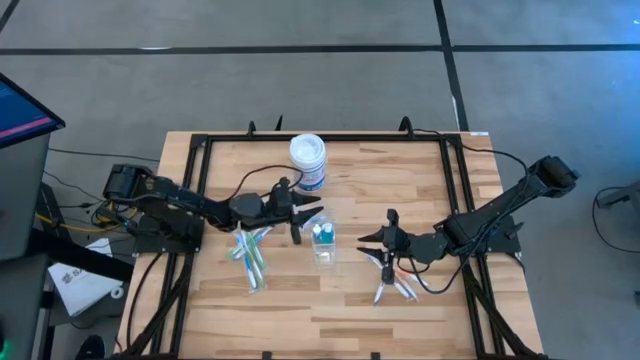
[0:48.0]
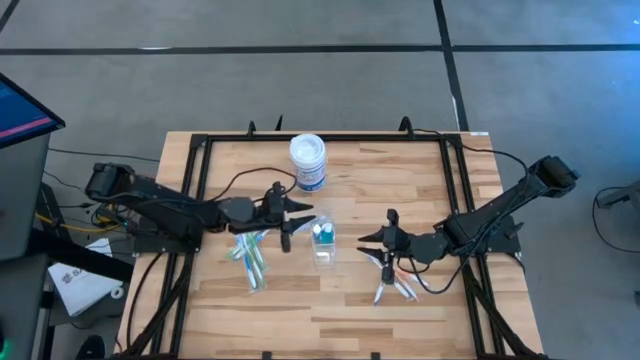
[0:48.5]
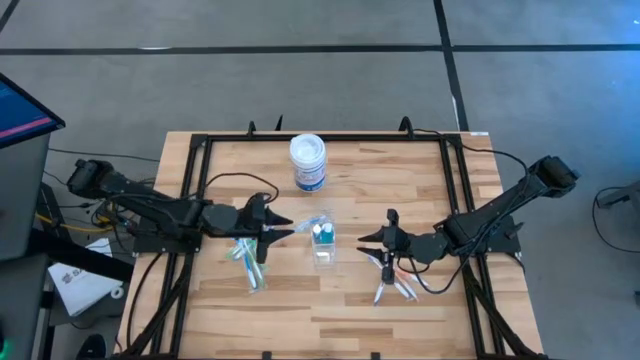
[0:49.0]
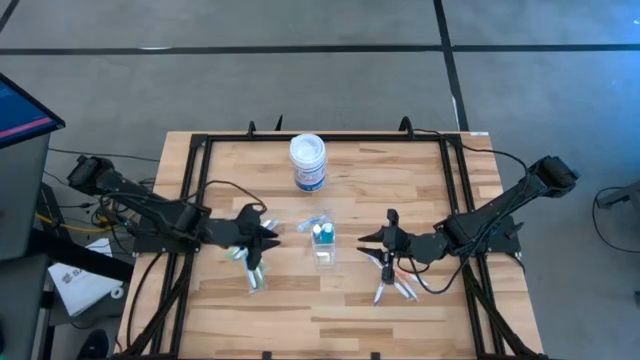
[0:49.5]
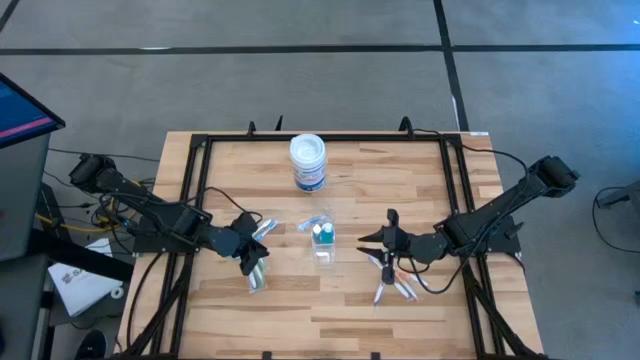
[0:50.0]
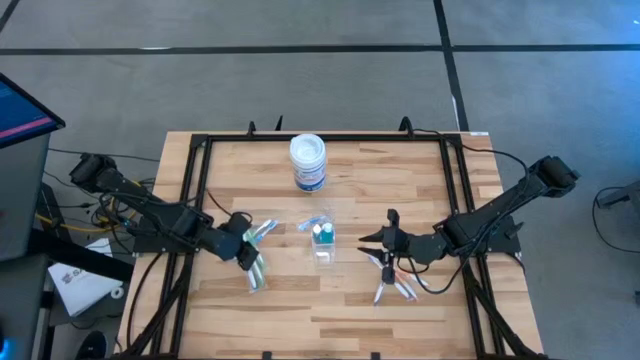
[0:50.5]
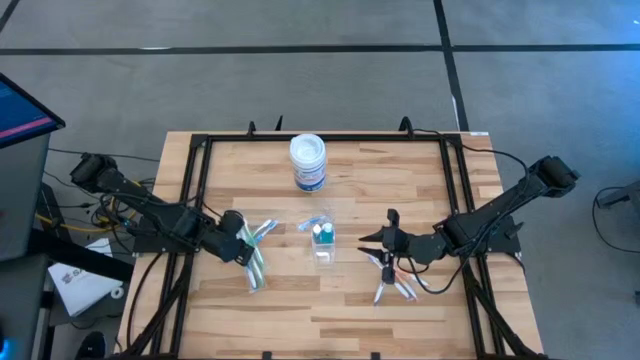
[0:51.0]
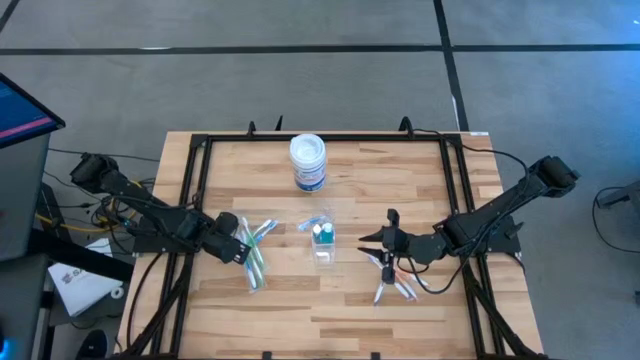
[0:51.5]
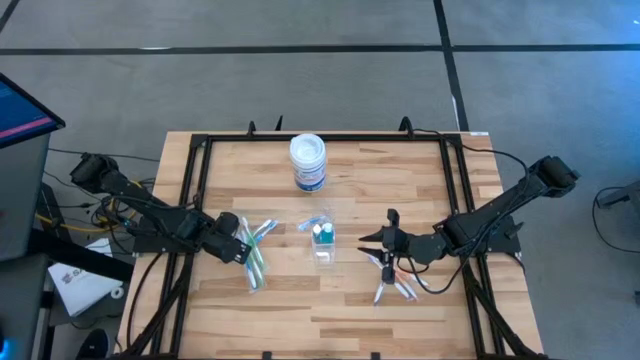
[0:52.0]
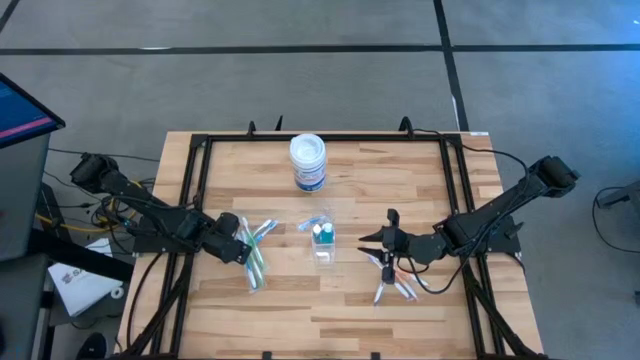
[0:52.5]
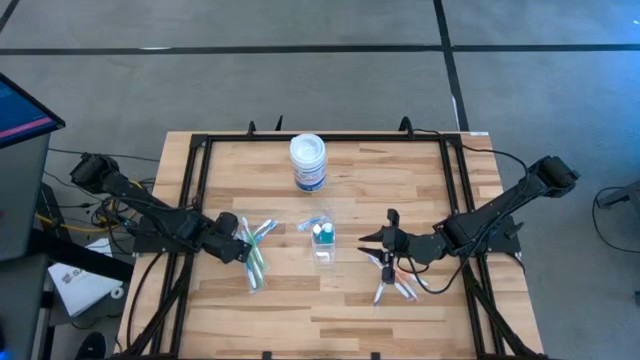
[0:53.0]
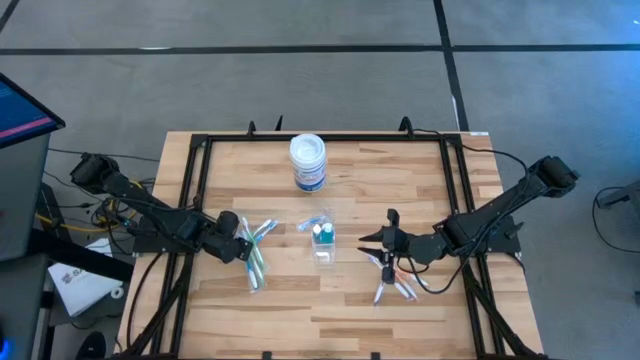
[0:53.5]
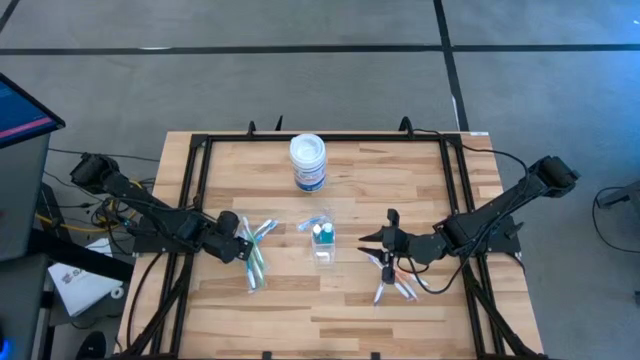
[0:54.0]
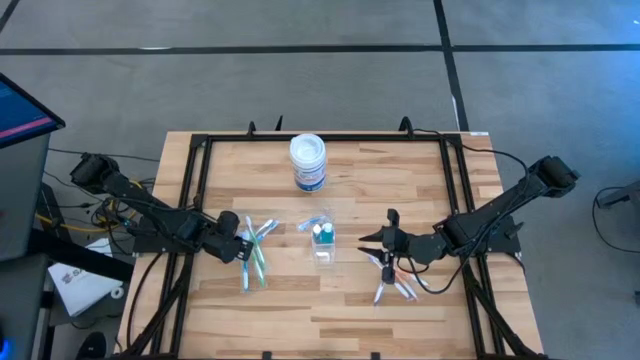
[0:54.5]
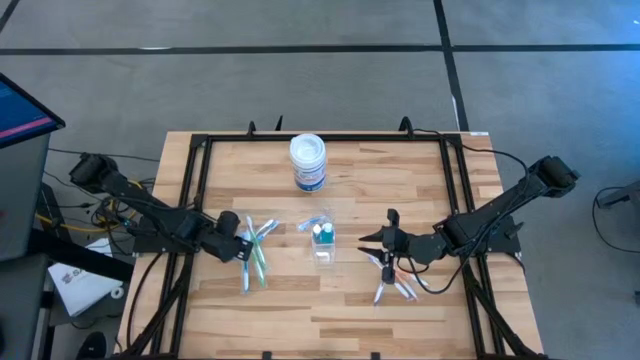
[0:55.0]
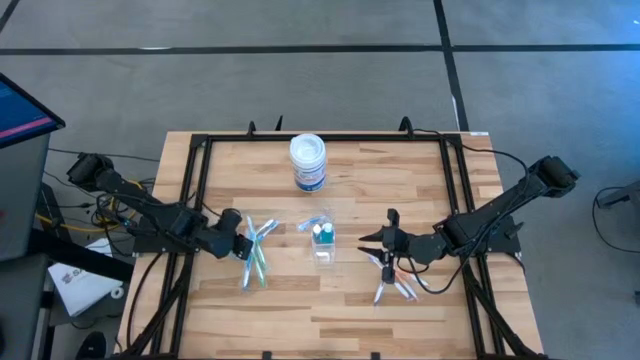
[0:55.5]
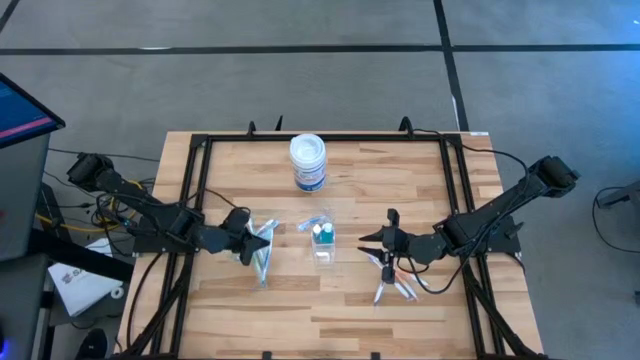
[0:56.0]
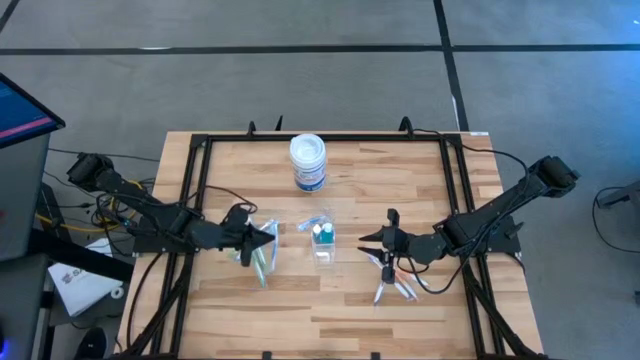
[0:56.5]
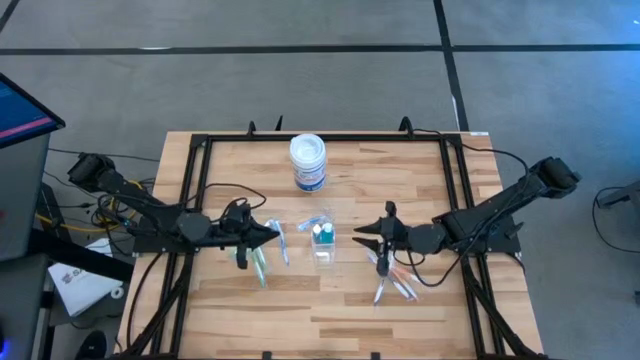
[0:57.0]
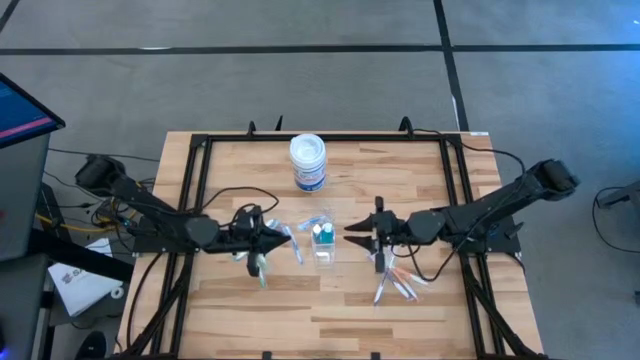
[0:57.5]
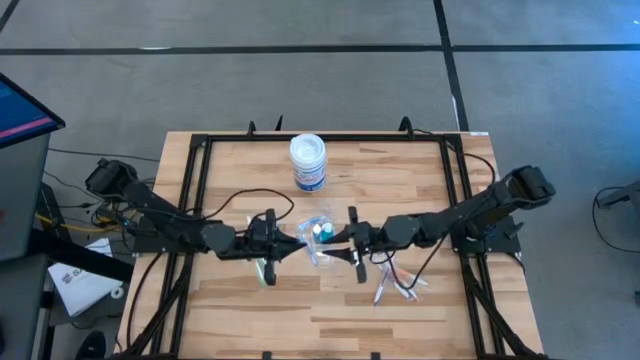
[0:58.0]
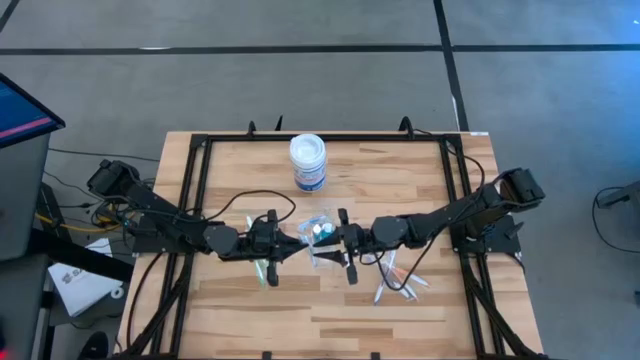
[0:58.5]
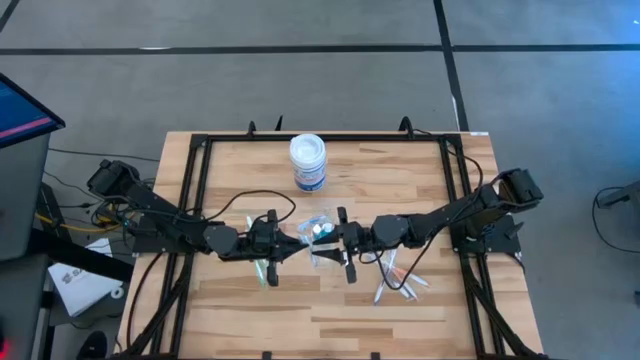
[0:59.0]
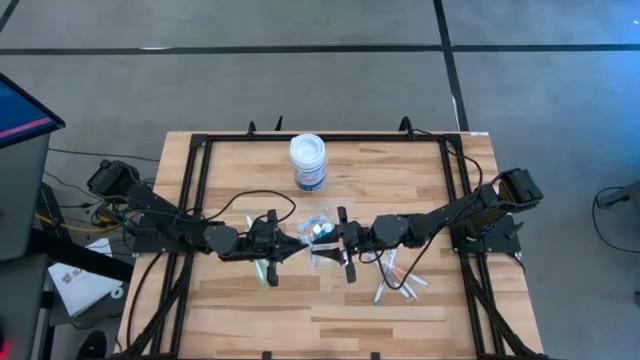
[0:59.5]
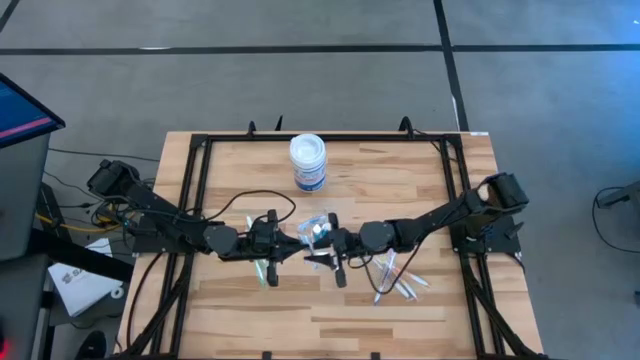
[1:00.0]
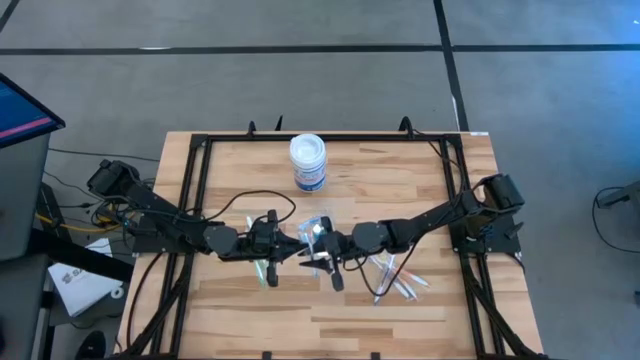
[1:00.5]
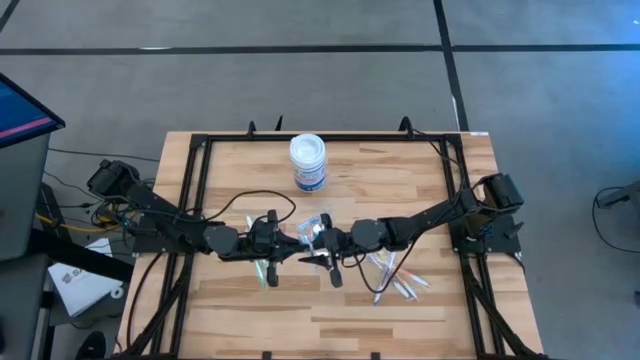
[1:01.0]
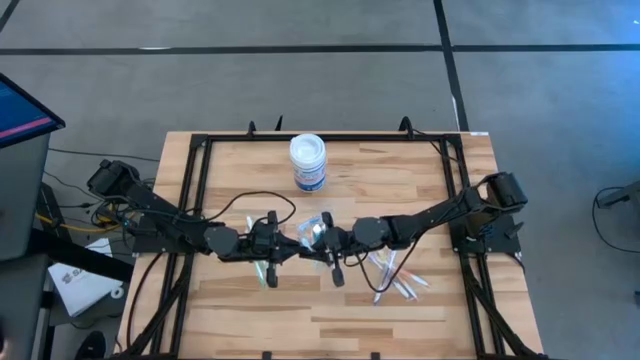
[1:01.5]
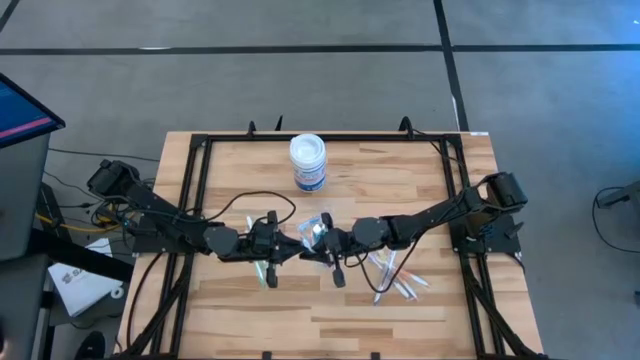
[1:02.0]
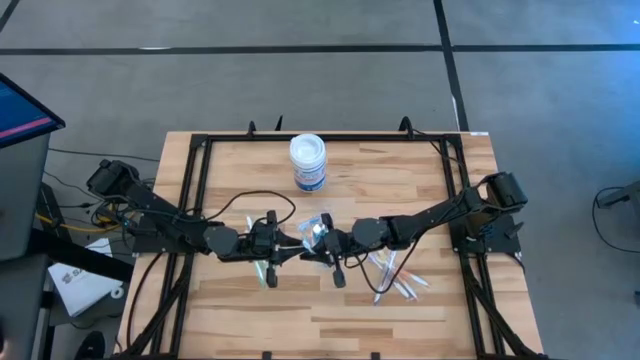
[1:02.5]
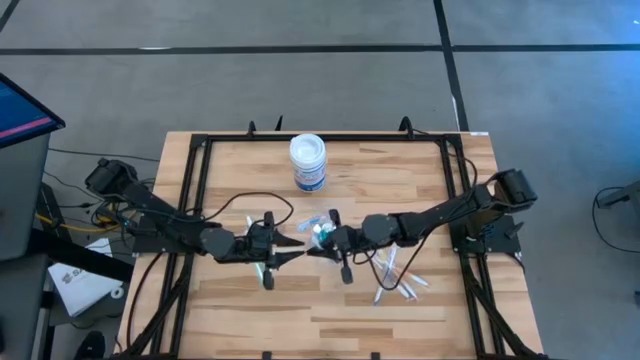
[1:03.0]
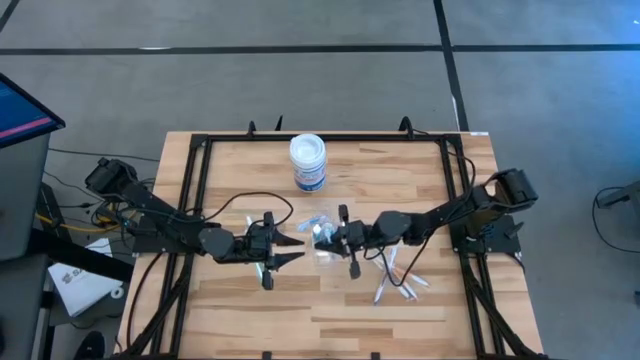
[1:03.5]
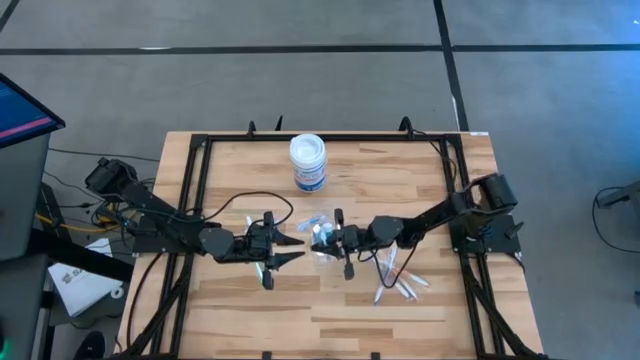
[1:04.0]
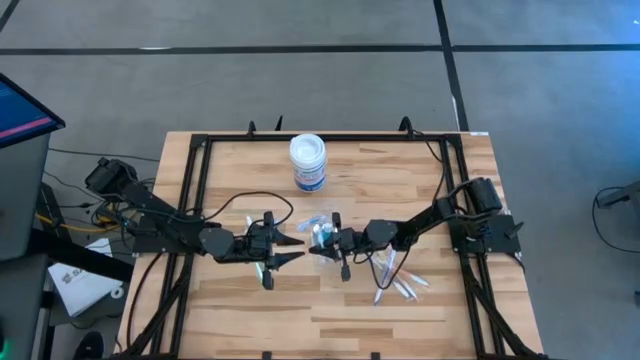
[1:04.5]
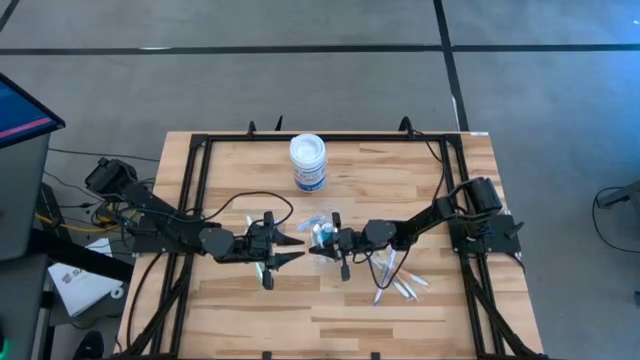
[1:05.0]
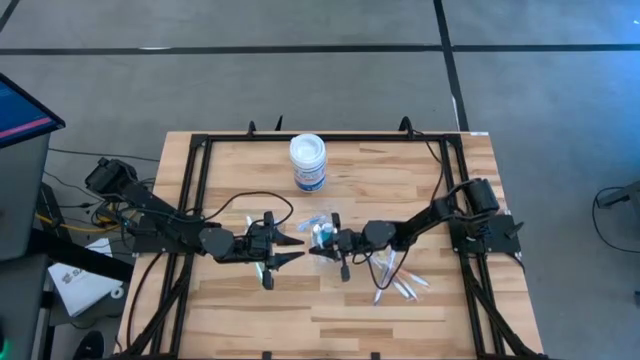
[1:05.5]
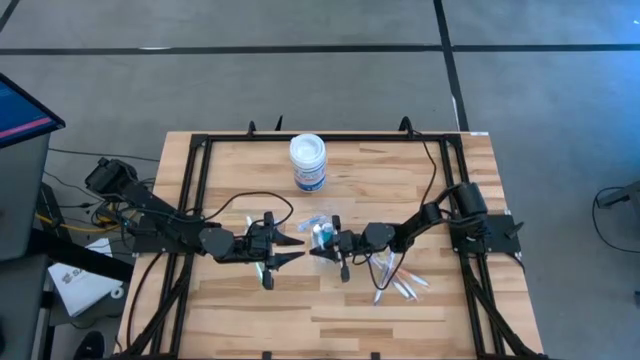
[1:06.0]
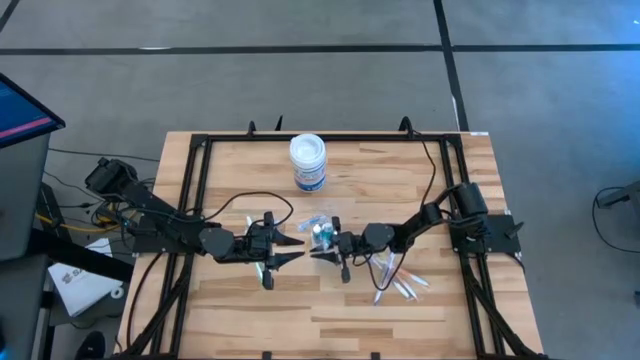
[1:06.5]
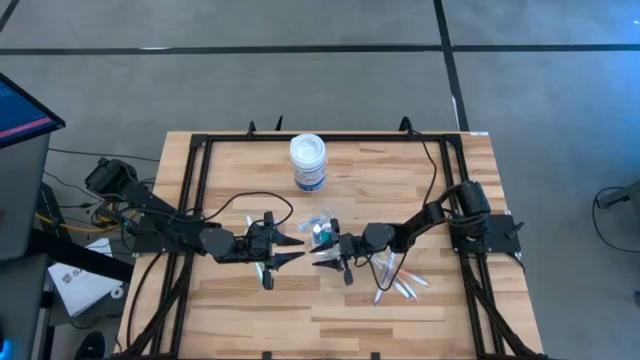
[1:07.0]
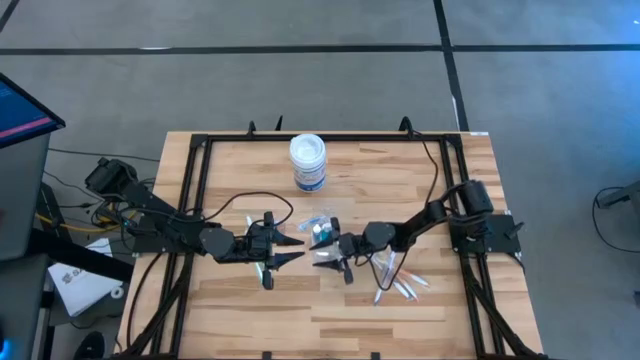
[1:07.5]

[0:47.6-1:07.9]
Task: Pick & Place toothbrushing station
Put the bottom blue toothbrush into the Transparent organizer
